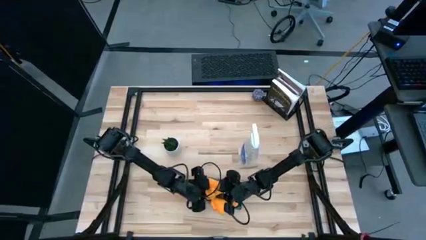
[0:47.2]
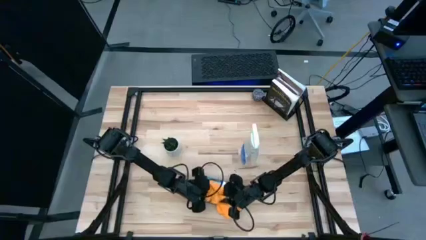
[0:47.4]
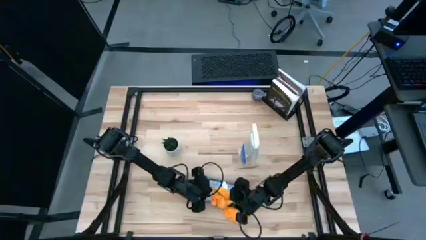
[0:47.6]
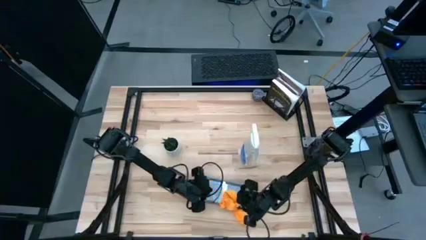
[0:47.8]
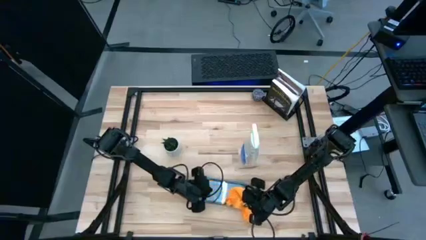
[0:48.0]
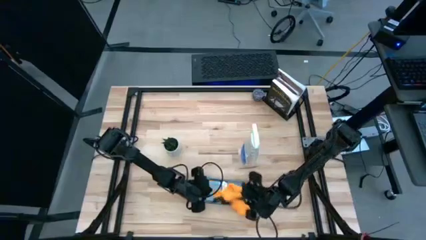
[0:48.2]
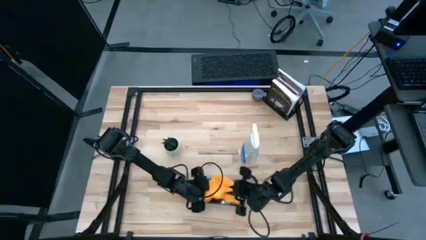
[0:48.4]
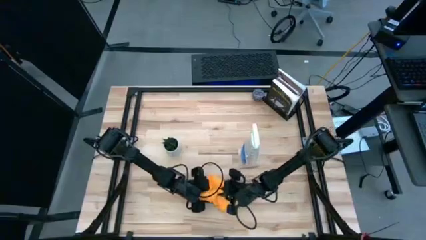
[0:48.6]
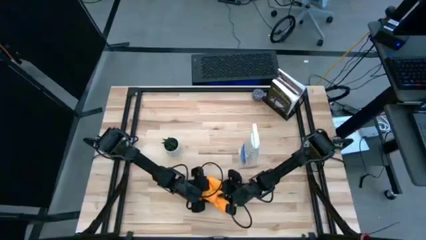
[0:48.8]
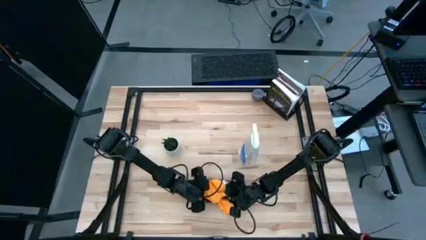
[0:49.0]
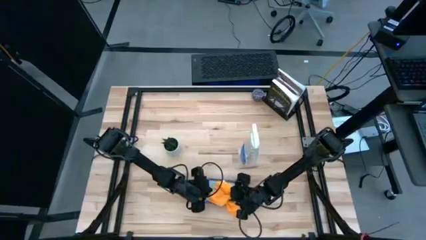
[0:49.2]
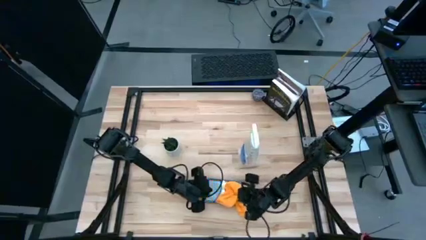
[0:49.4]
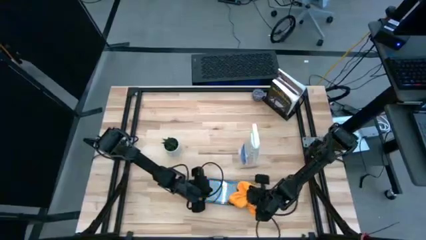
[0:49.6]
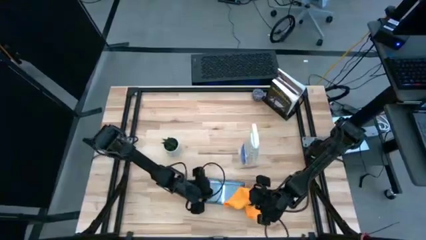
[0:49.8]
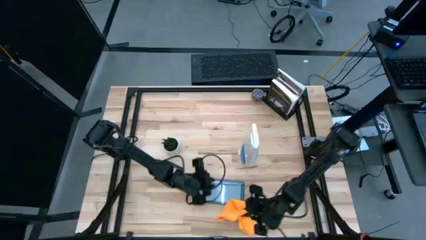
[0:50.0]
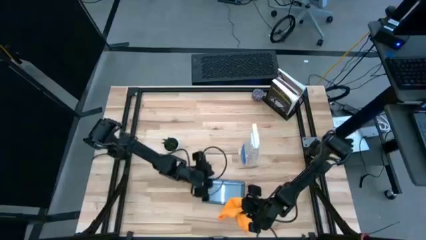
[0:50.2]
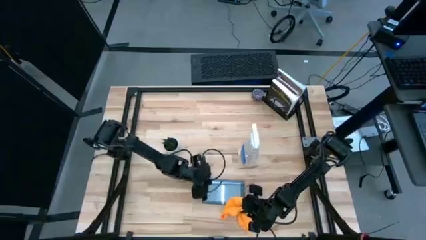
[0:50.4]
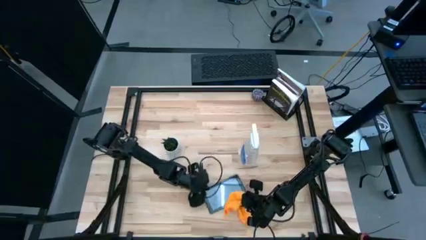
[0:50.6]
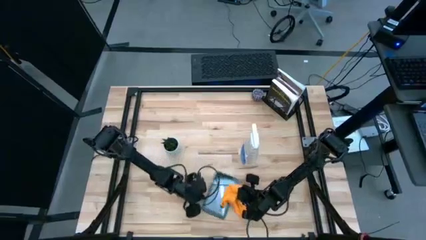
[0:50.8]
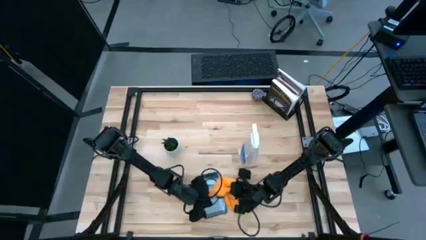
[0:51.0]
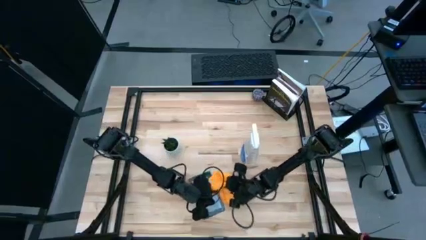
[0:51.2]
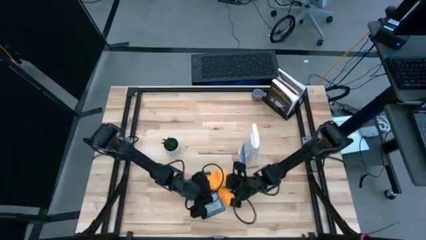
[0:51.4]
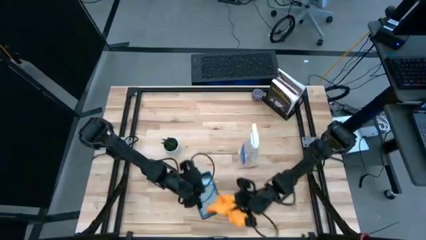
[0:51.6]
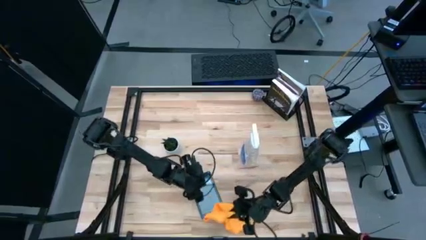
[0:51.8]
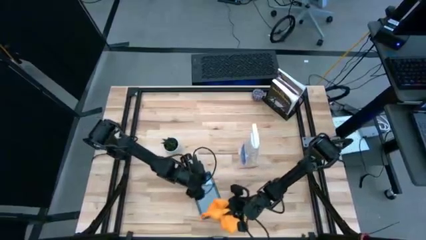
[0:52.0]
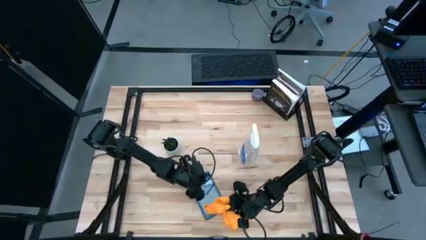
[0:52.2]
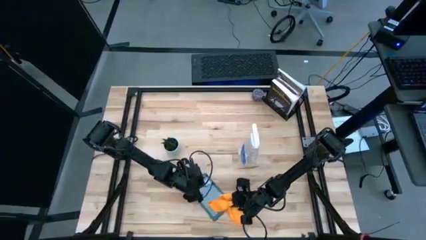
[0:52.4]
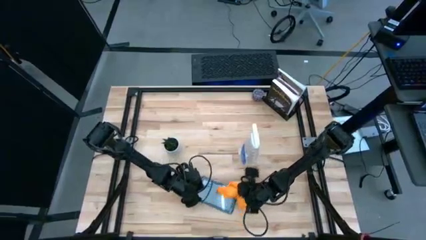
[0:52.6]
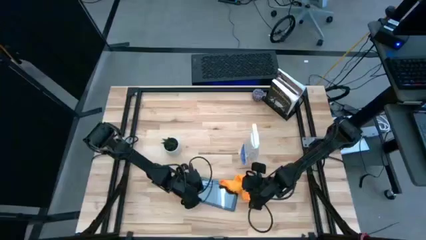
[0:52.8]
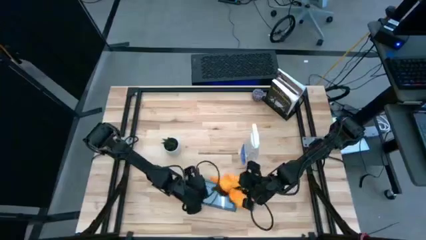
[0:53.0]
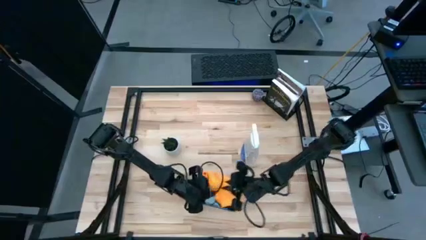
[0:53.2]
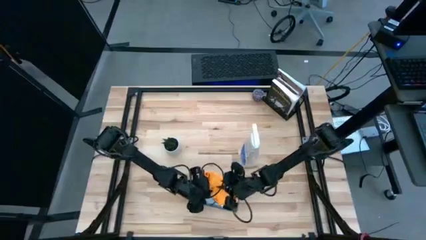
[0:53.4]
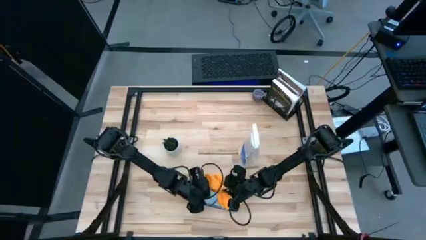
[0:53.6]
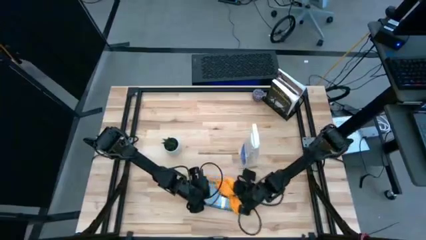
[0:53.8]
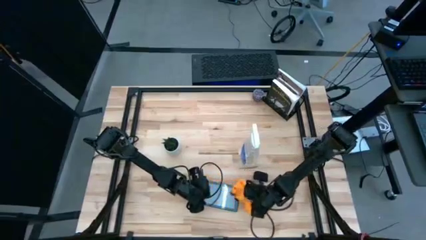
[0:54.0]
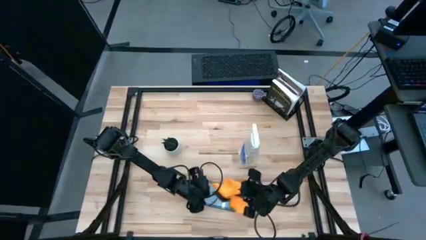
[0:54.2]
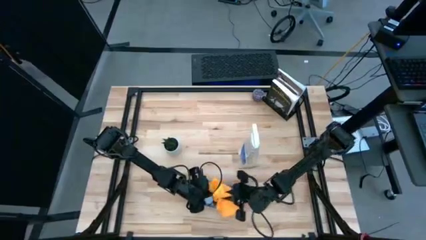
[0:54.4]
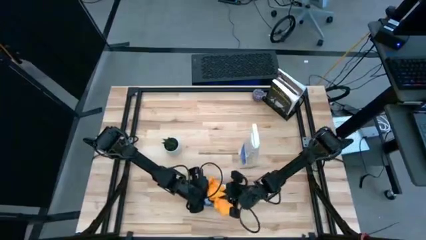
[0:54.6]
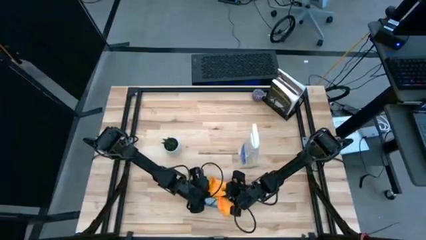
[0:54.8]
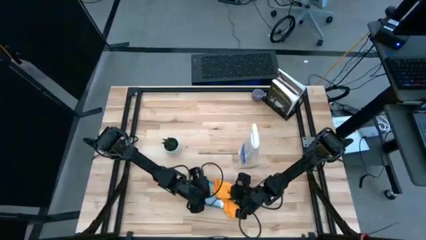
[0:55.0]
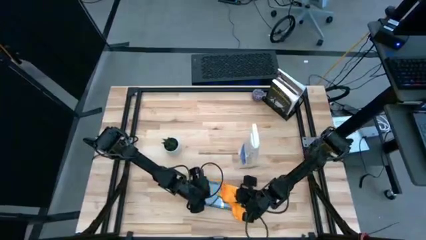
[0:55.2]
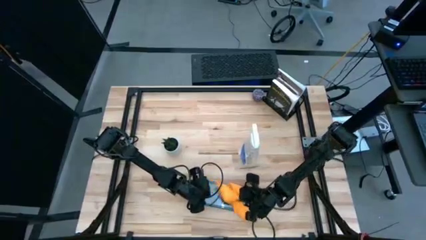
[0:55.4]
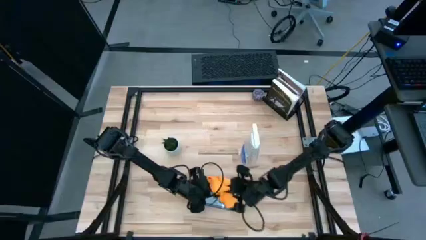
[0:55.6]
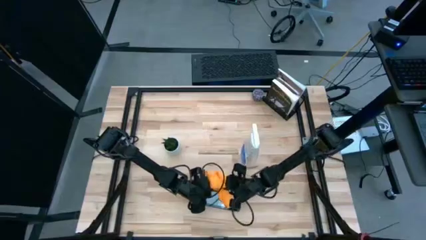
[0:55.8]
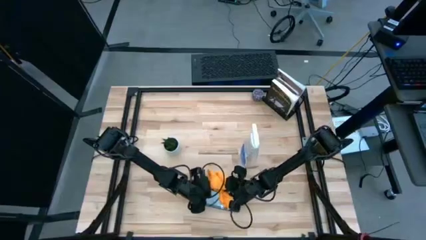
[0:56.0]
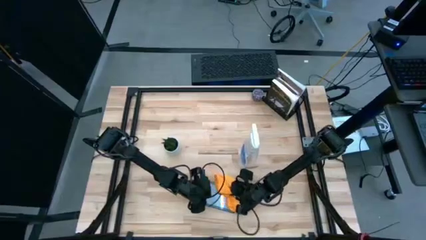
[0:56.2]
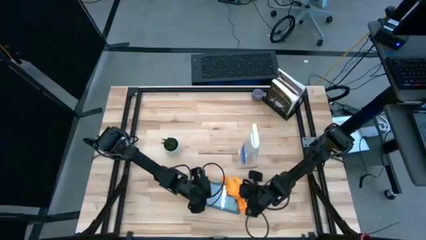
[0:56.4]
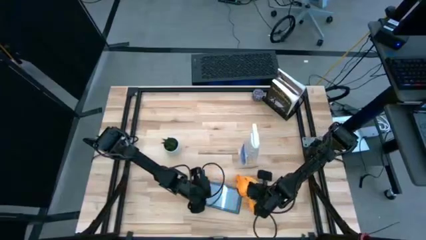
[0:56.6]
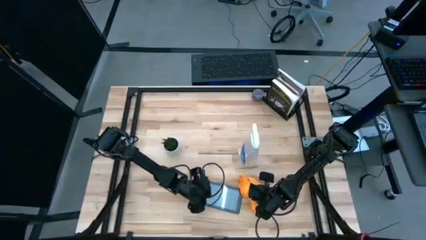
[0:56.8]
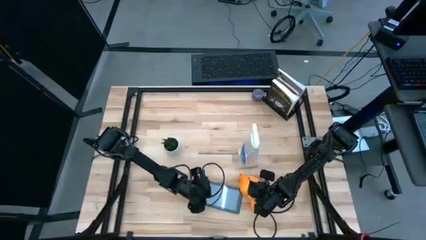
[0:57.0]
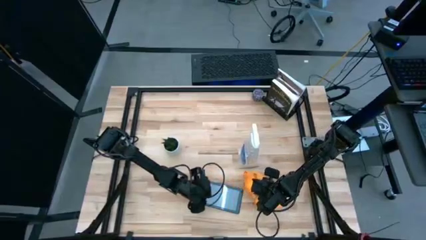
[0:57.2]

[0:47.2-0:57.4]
Task: Apply microfiber cloth
Wipe the tablet with the microfiber cloth

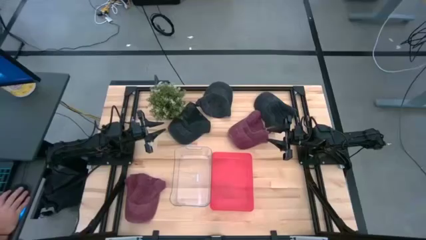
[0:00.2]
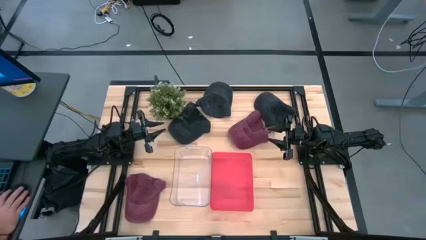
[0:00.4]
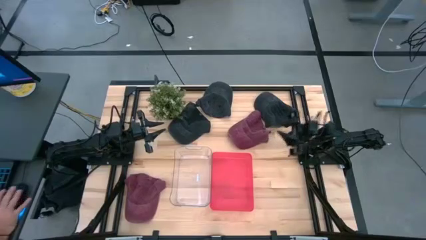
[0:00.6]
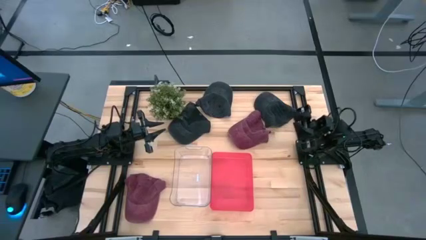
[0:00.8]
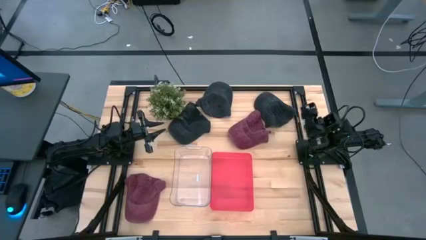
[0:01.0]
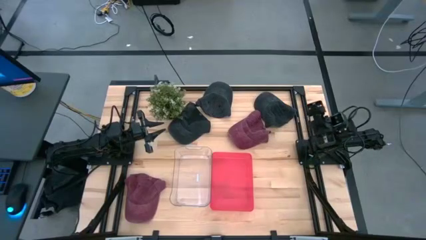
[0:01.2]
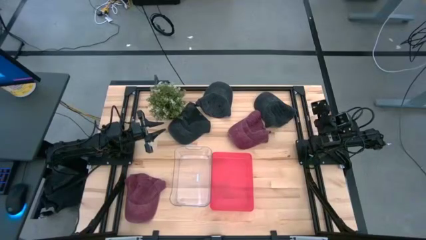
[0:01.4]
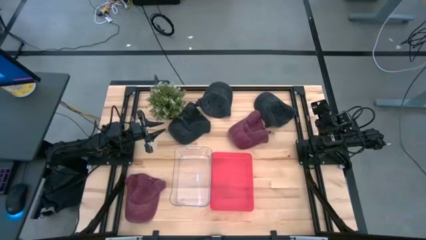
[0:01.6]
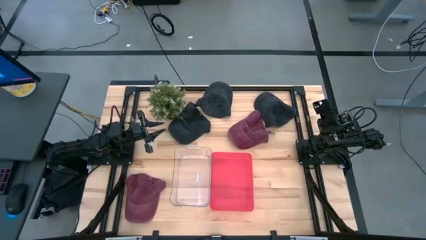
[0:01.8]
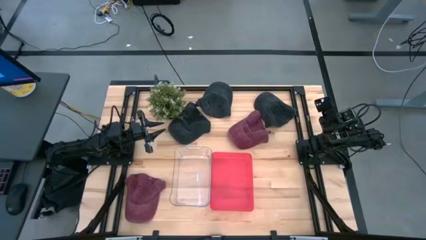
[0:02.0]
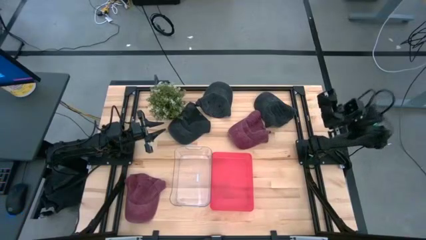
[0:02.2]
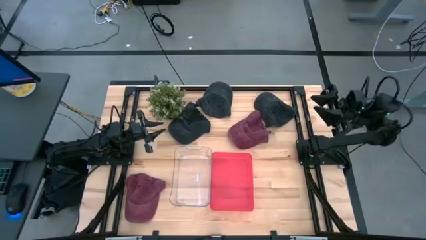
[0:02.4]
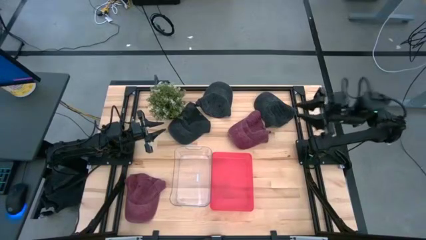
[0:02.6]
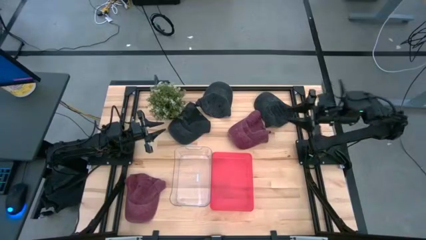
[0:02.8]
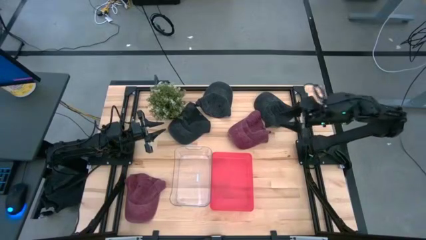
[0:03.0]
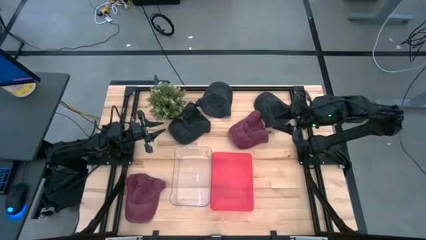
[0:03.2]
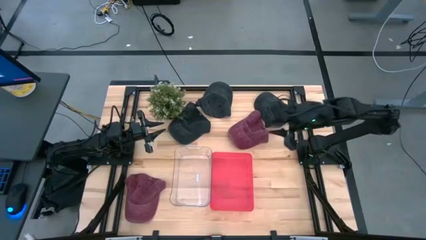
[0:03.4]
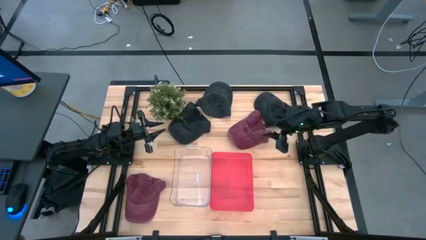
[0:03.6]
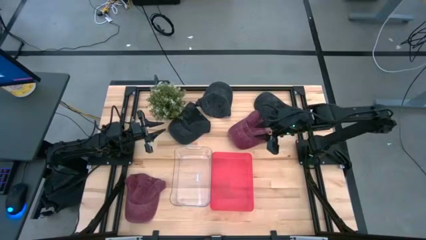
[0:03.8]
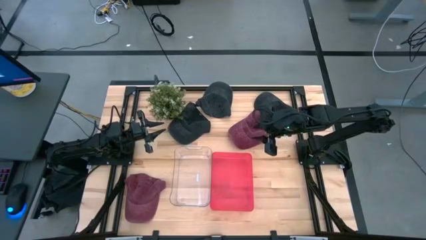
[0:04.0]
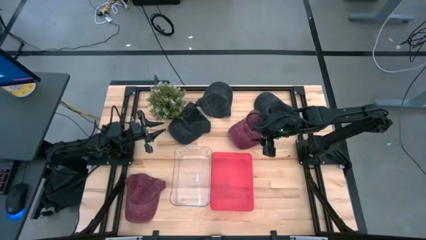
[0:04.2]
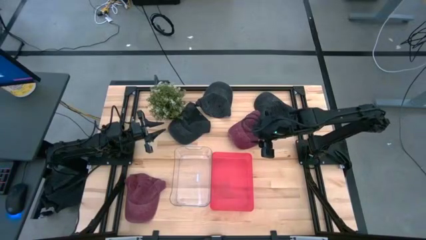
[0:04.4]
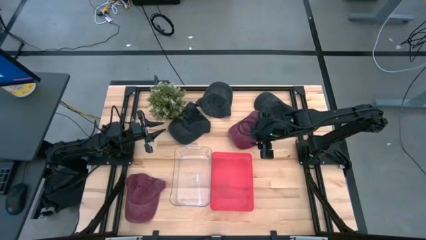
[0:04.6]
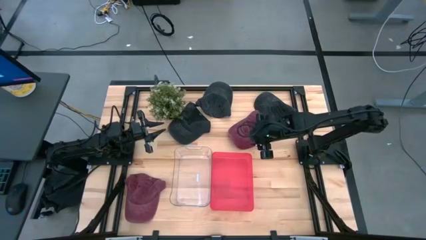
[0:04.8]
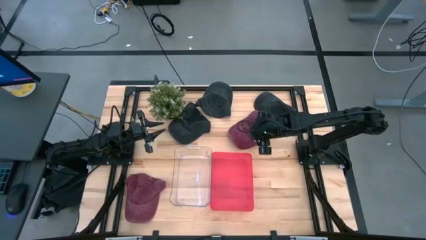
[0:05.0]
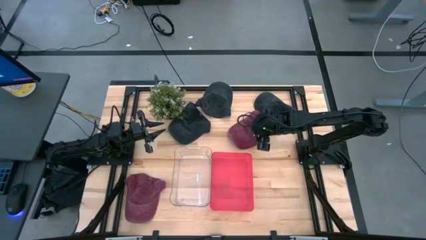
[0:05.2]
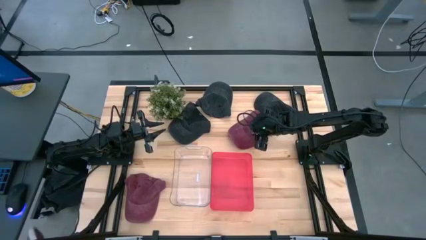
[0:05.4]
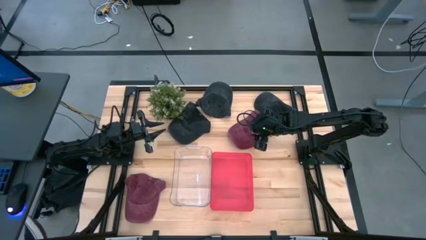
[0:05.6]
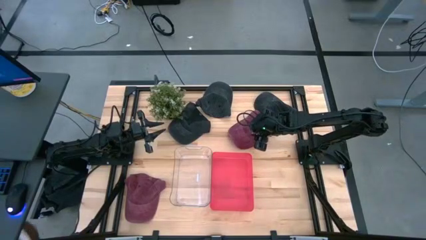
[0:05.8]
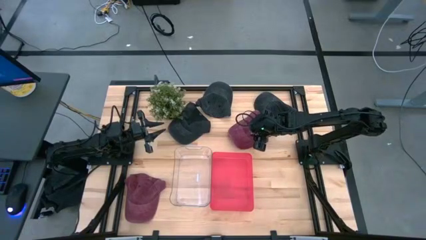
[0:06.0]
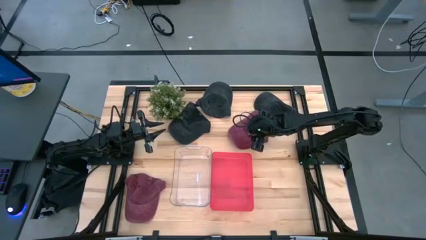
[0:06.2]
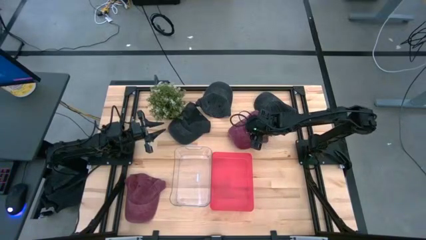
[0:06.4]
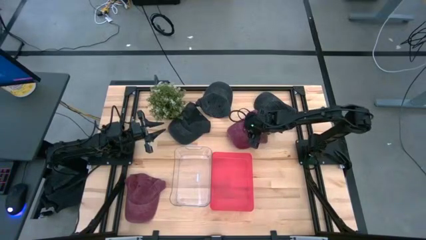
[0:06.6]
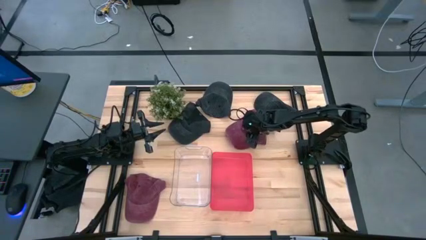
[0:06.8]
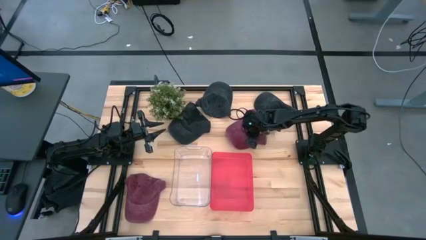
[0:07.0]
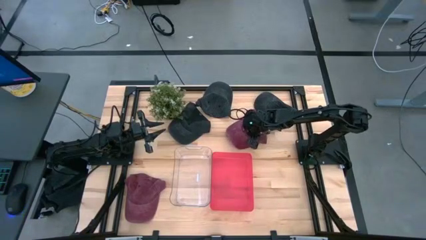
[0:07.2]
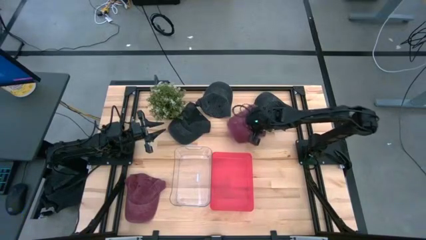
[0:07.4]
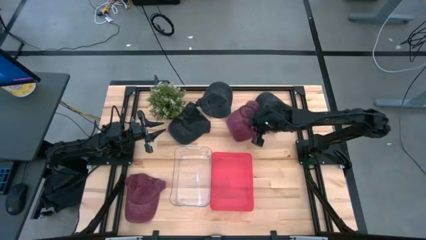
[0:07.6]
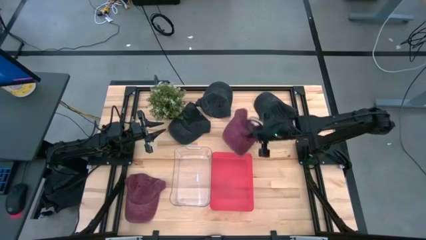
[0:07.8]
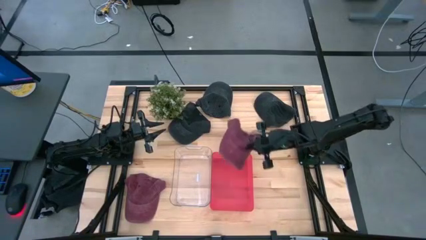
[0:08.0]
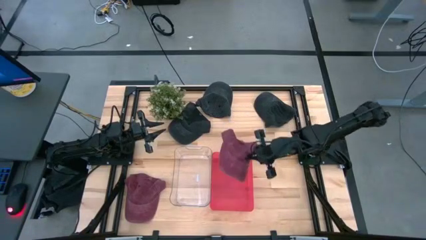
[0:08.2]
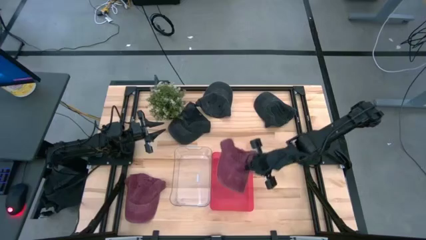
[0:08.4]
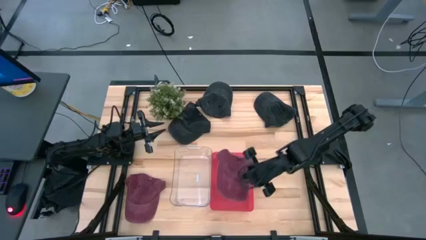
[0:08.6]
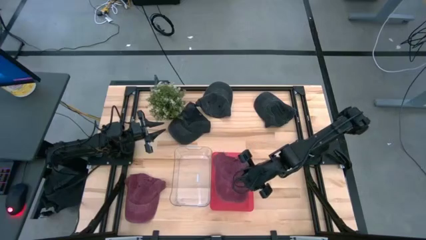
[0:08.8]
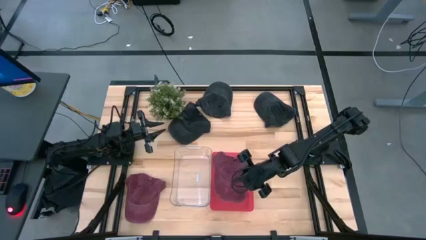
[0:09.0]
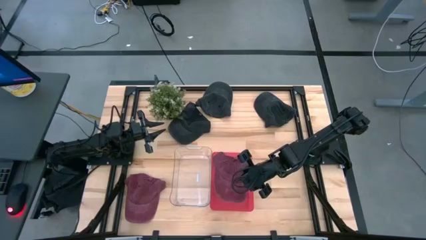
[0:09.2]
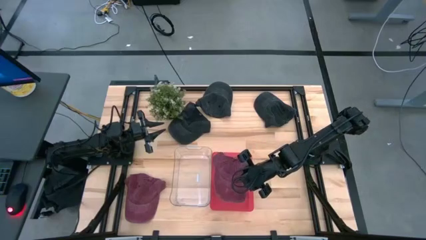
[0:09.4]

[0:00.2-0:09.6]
Task: Pick & Place hat
Put the top red cap into the red bin
